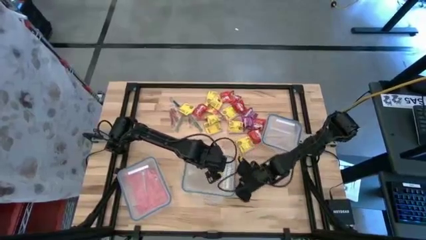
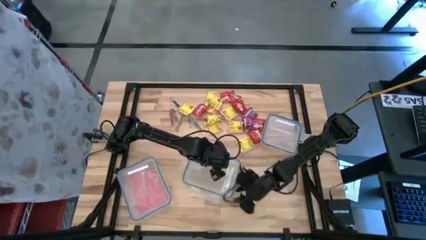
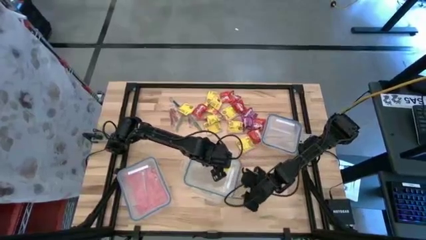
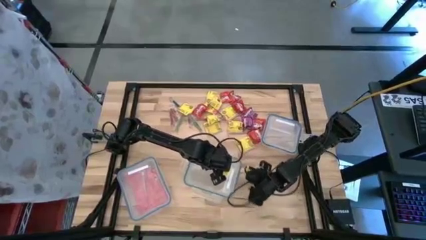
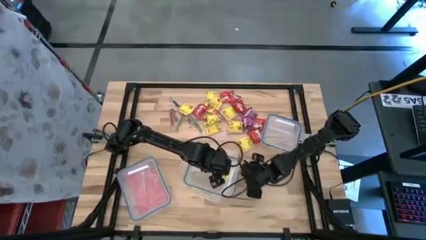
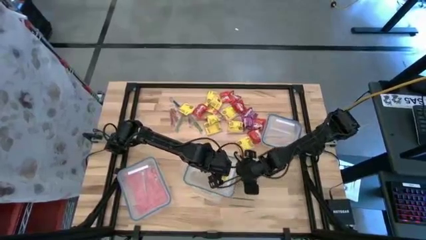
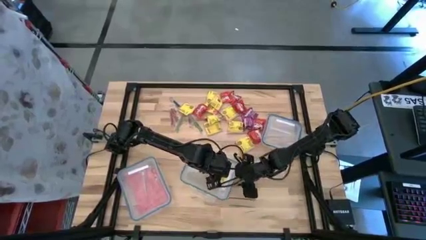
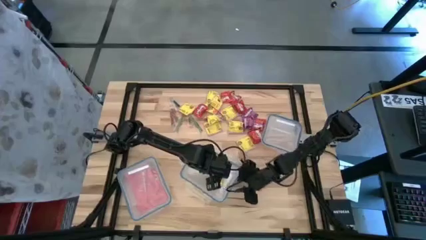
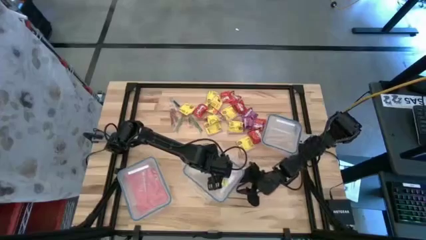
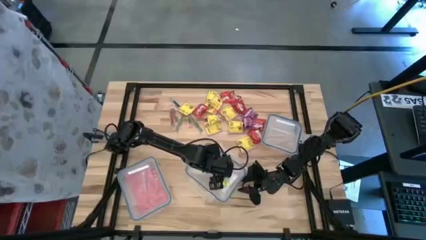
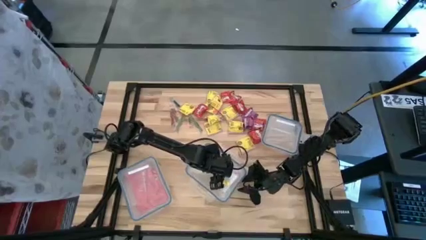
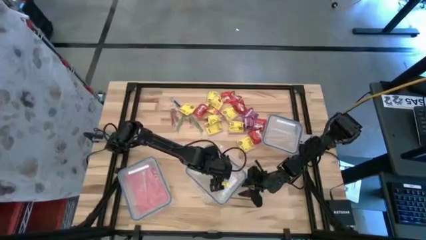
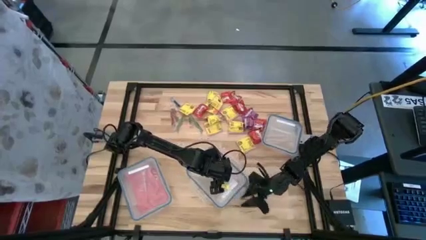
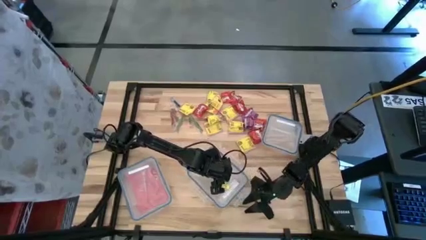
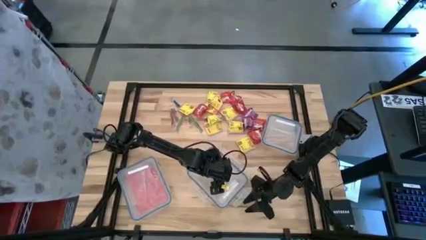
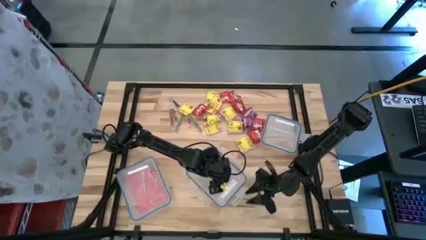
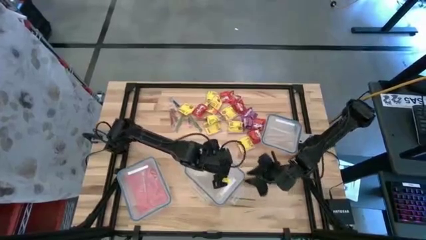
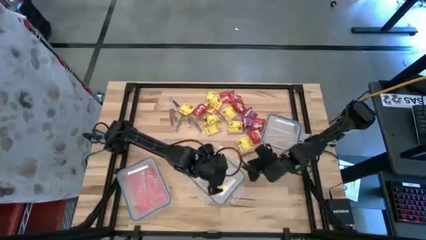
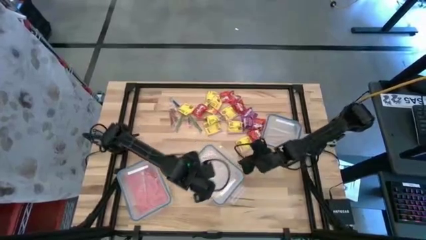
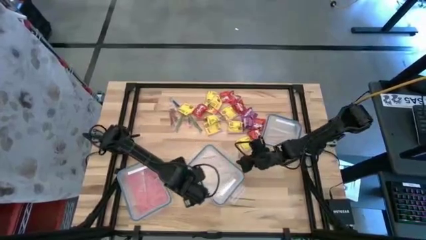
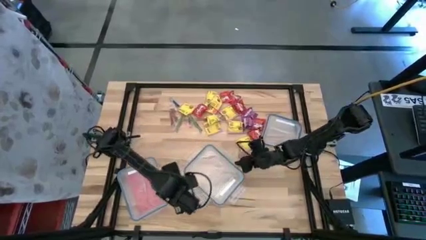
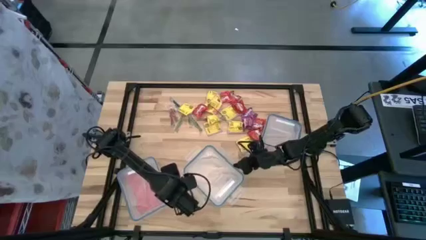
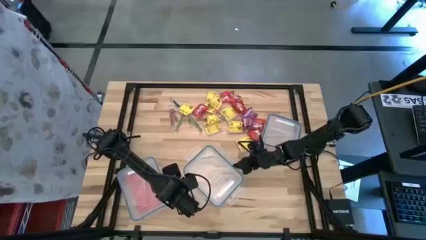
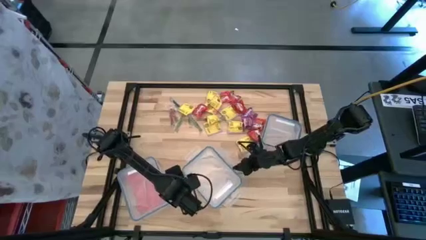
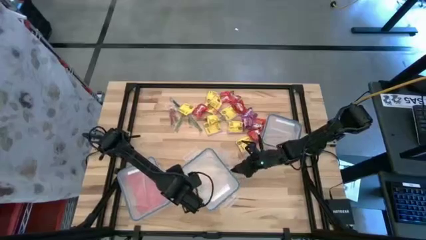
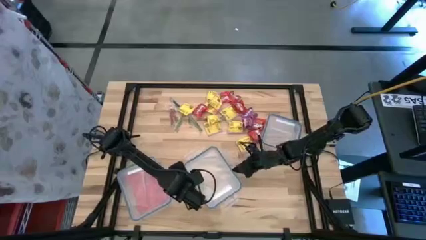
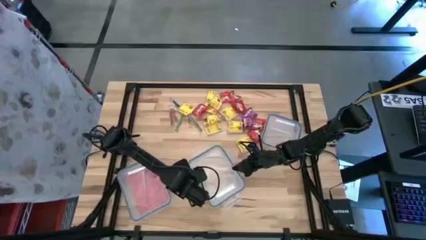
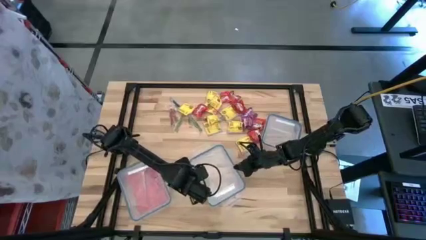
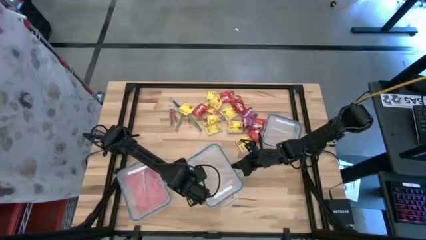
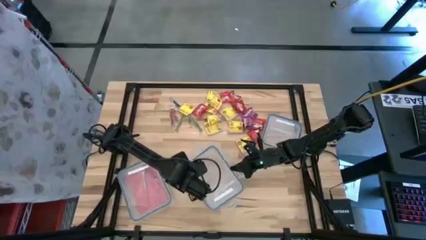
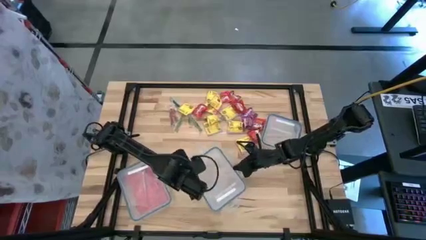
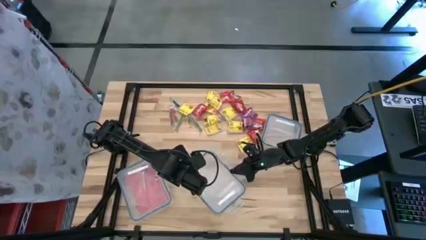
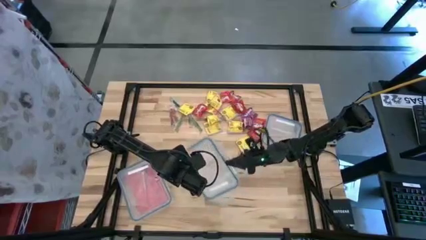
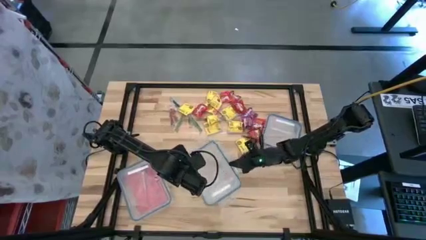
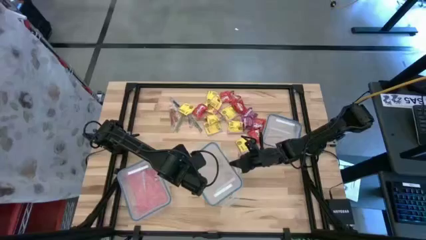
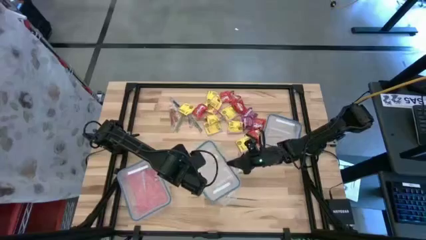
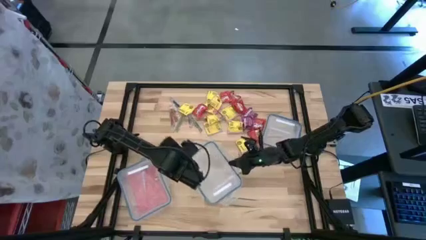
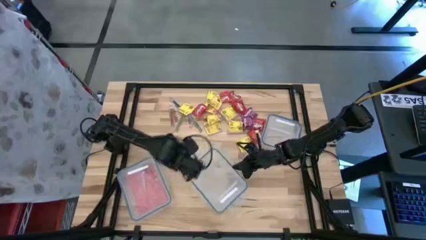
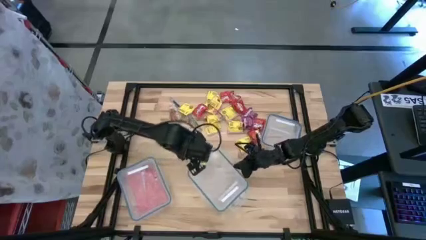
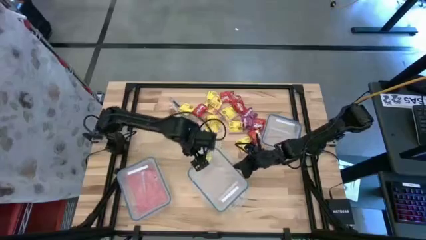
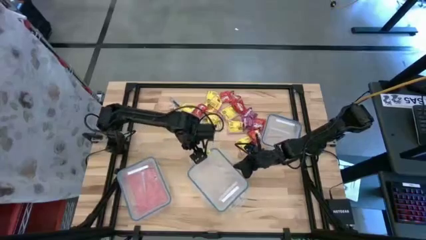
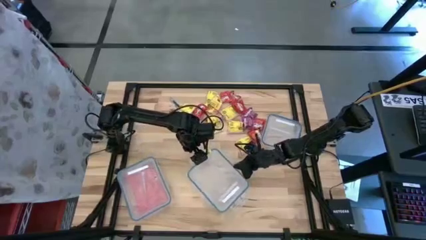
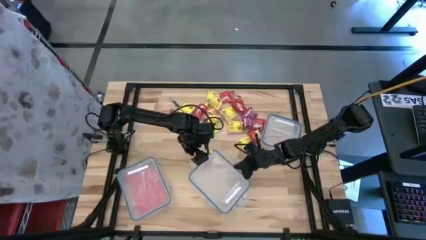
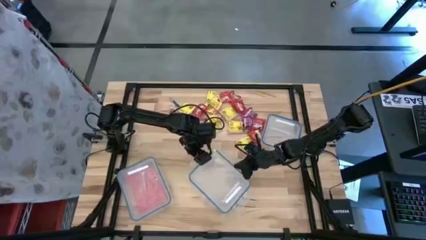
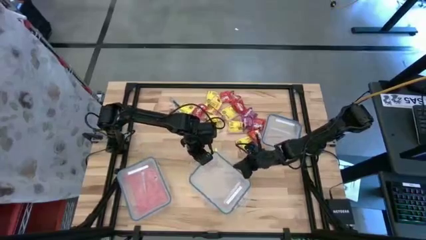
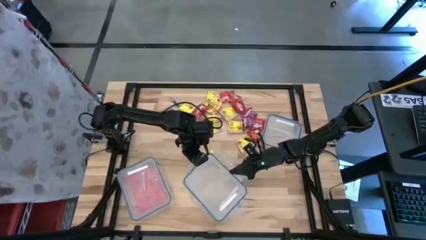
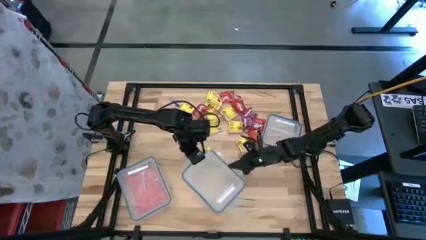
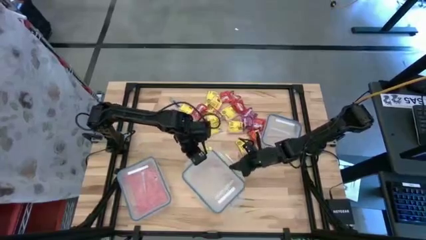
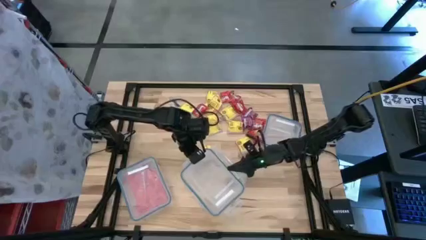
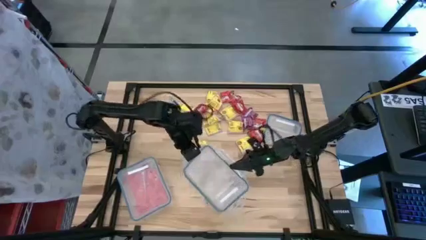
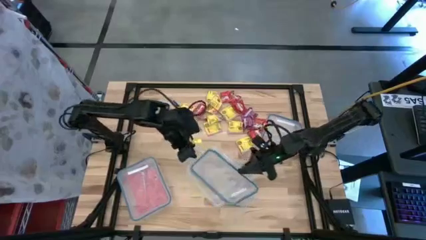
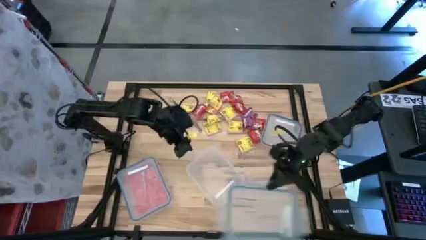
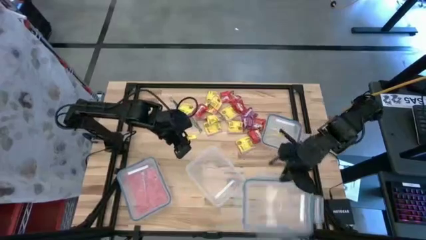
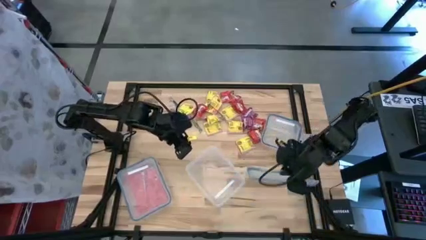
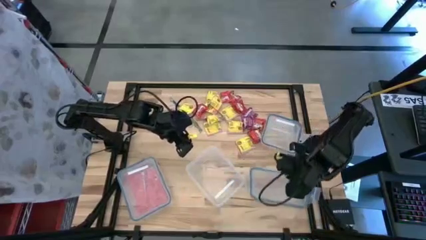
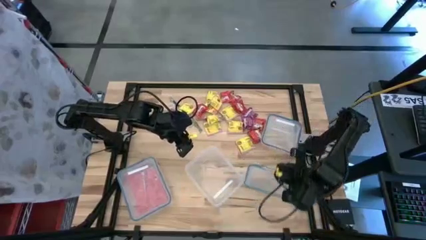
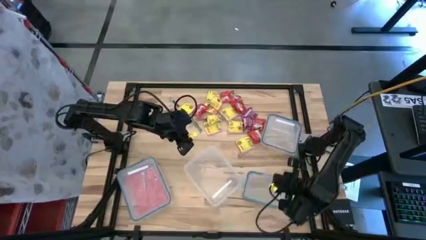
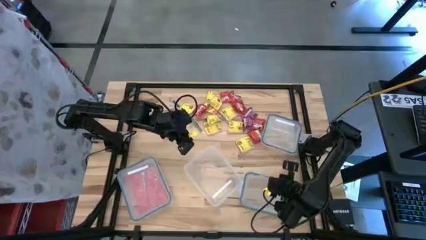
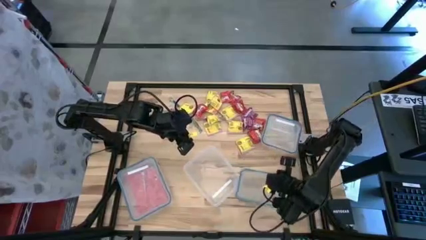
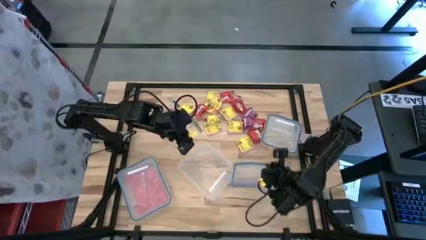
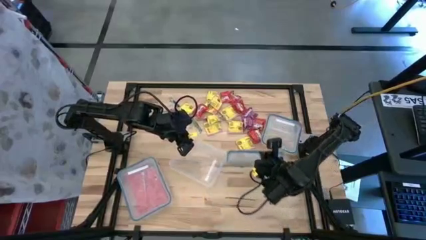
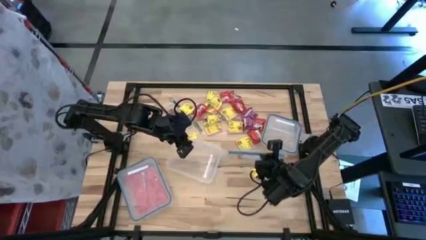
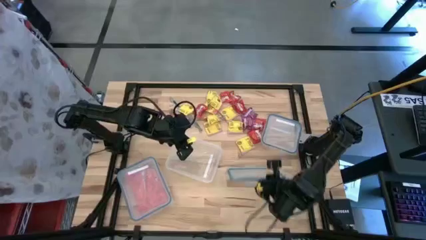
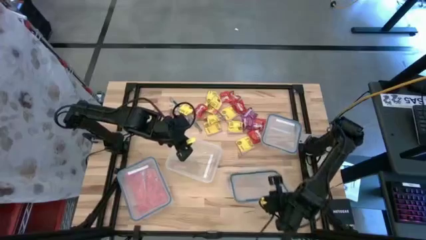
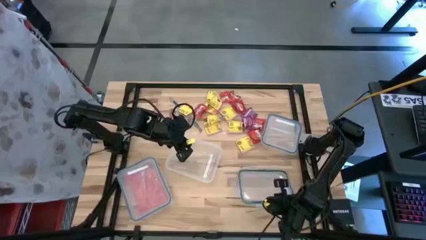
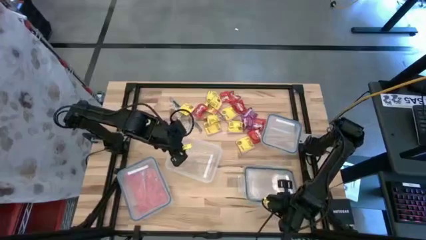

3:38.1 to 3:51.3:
Task: Sort candy
Open the rectangular transparent bin
